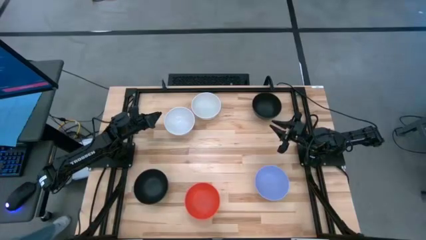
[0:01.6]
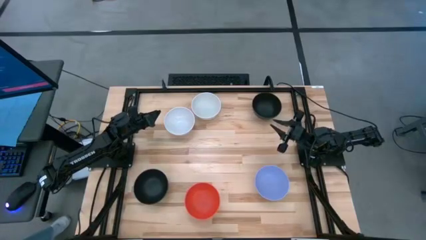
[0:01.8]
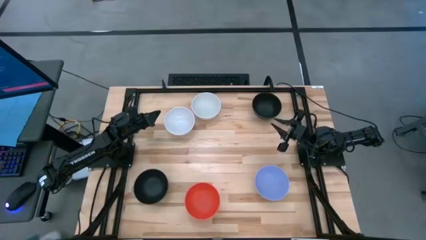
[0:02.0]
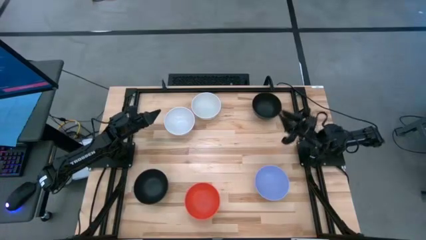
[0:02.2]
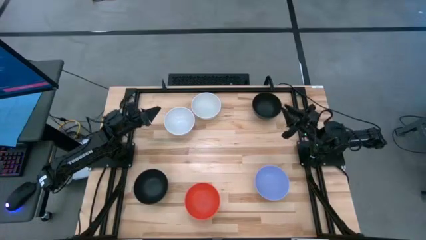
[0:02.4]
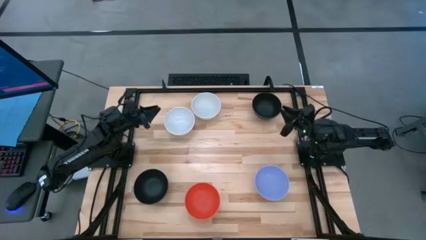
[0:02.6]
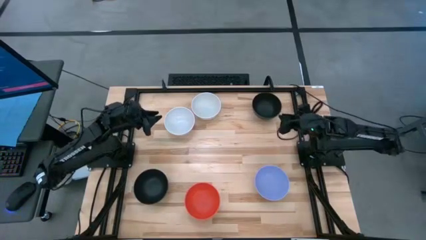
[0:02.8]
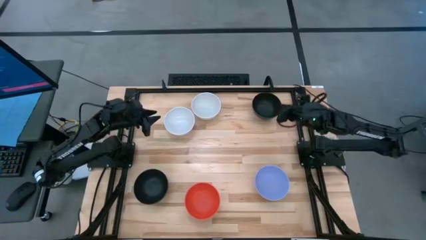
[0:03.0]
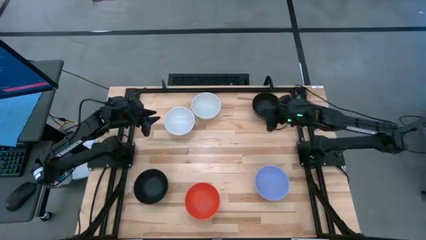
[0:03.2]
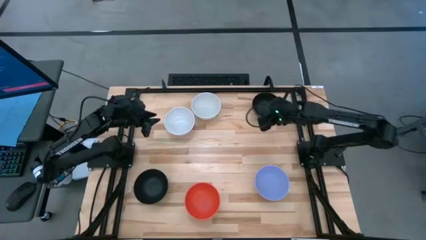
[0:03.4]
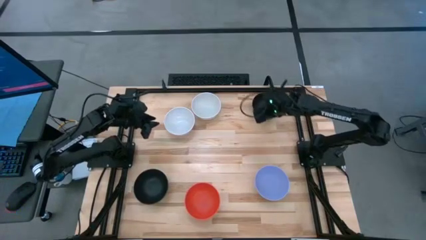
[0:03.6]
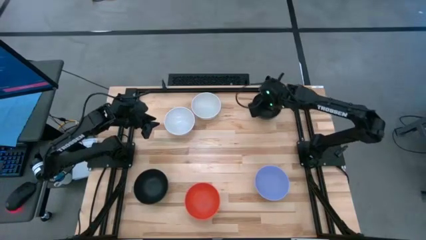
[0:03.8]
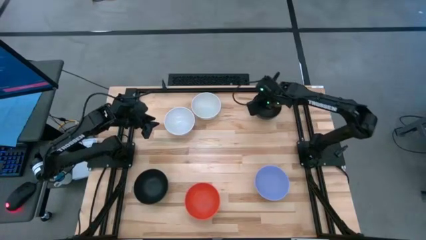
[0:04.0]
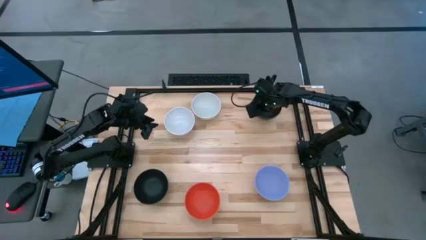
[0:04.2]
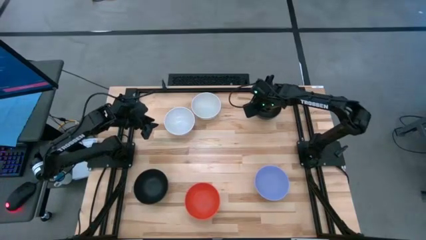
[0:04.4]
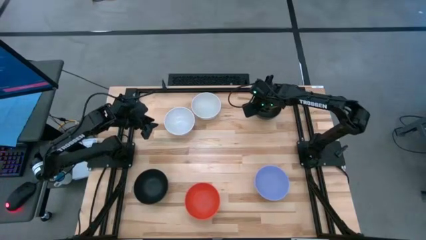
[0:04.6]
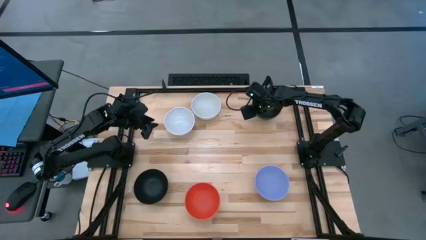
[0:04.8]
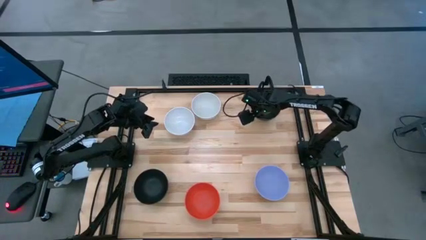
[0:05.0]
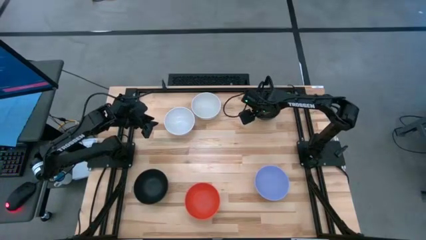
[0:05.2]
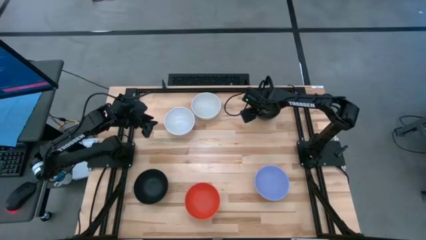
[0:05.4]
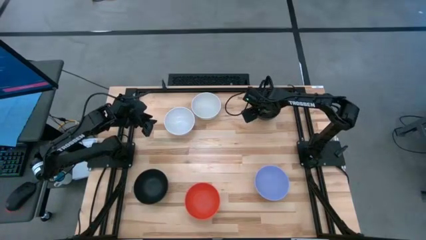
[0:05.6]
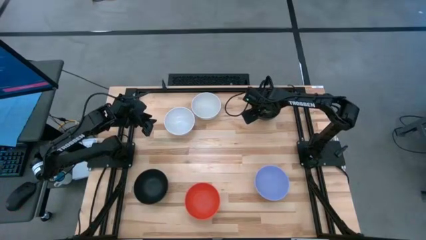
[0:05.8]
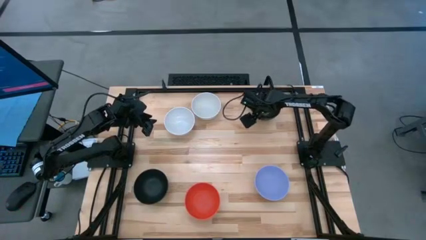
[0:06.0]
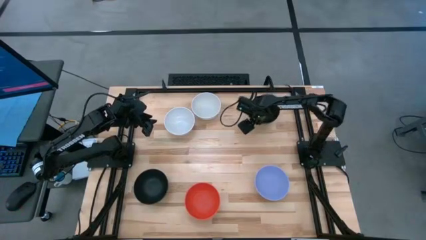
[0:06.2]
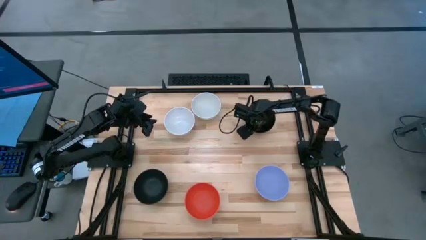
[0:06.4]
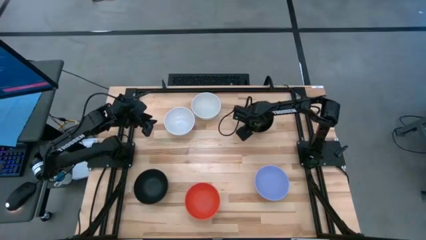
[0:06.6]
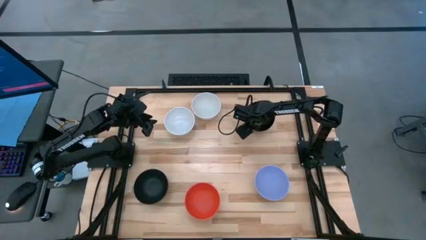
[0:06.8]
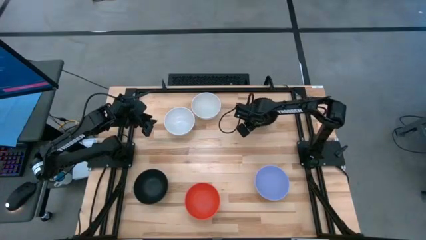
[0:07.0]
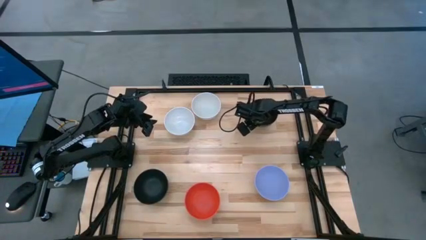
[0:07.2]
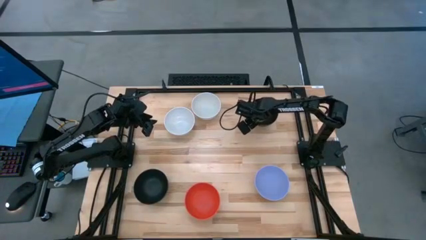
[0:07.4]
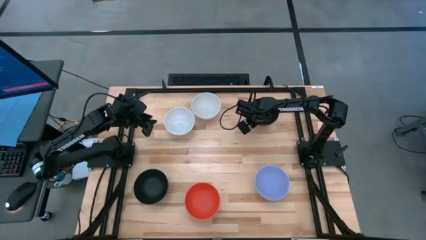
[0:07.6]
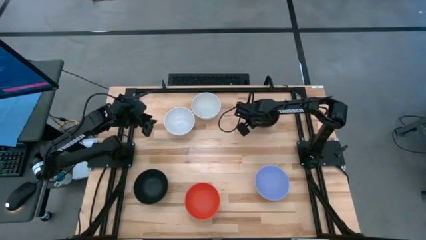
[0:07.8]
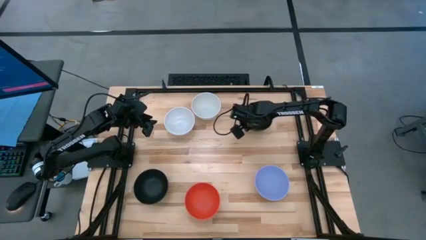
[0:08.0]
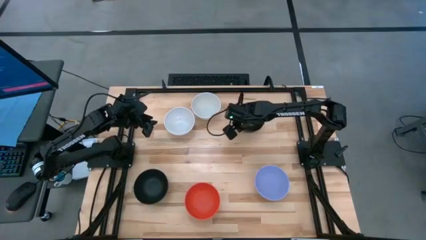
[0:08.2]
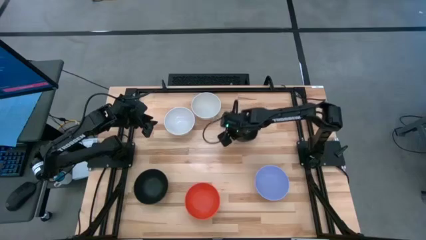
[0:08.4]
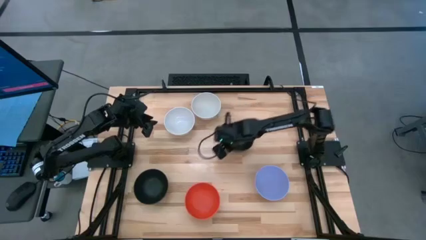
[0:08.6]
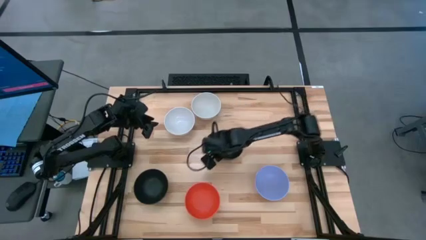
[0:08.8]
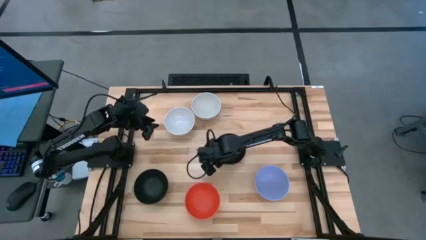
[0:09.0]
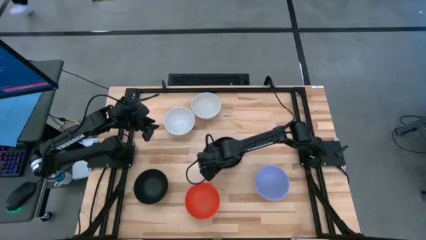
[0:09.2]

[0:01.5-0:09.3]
Task: Nest bowls inside each other
Move the right black bowl to the center of the table

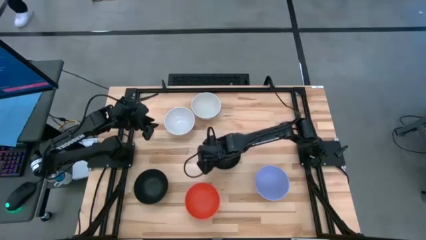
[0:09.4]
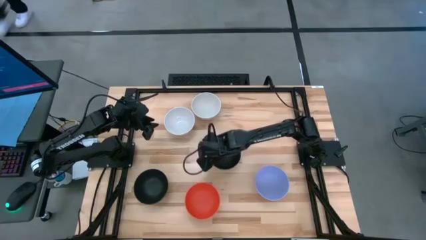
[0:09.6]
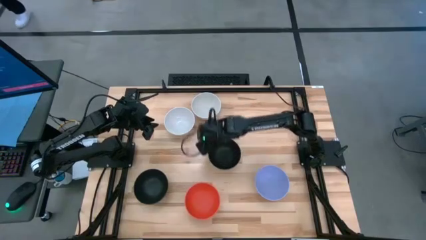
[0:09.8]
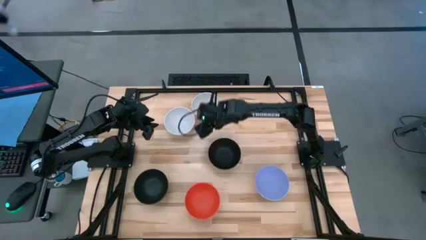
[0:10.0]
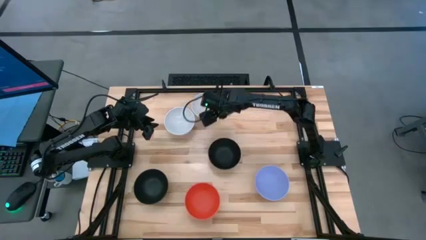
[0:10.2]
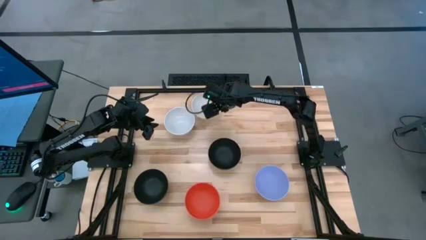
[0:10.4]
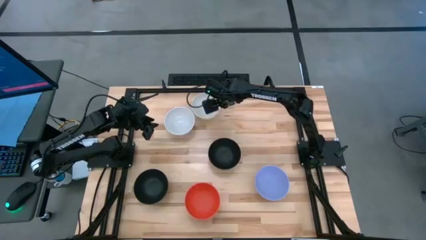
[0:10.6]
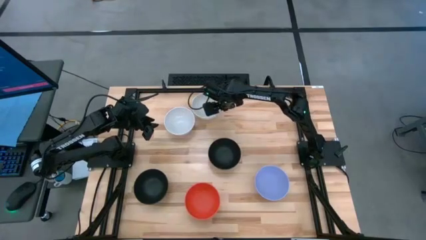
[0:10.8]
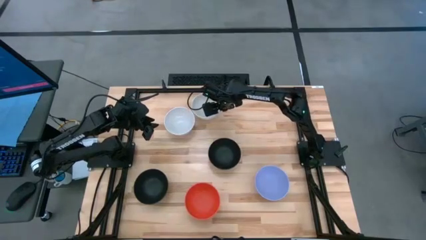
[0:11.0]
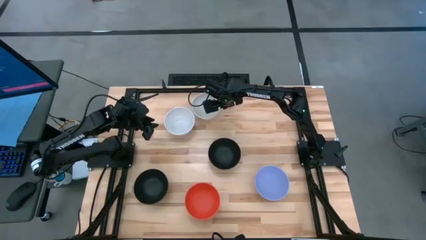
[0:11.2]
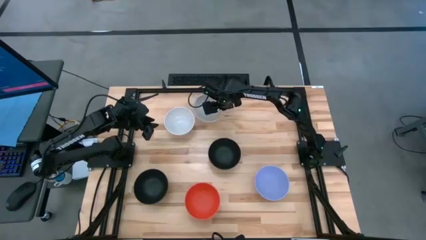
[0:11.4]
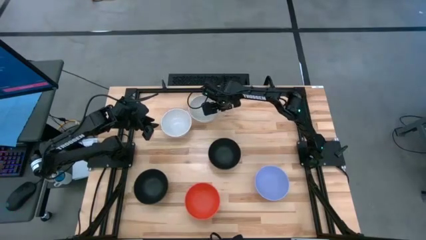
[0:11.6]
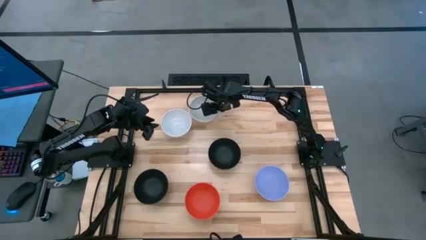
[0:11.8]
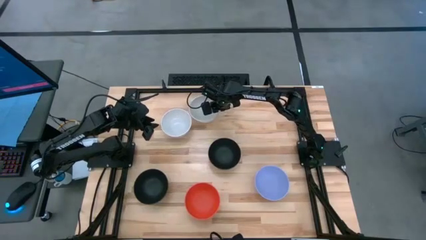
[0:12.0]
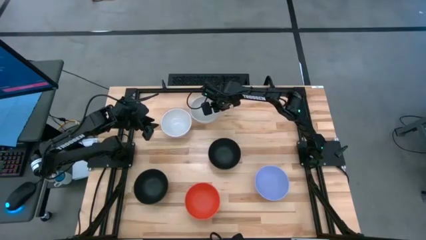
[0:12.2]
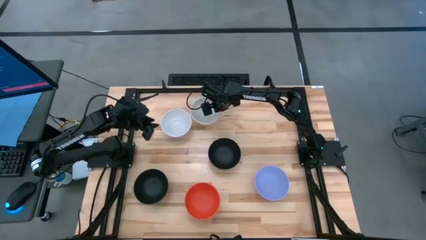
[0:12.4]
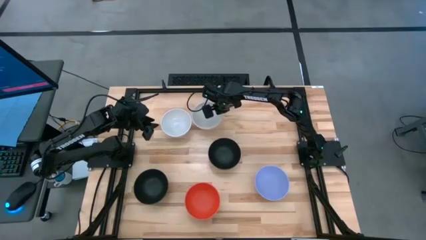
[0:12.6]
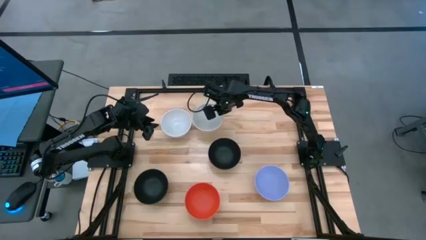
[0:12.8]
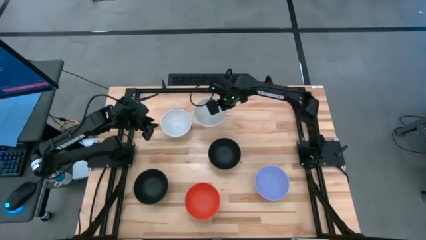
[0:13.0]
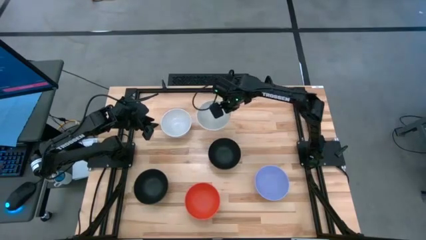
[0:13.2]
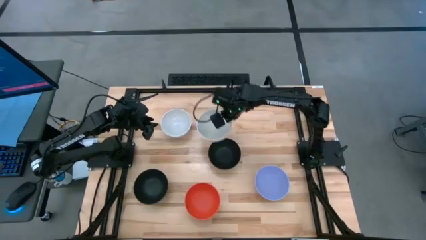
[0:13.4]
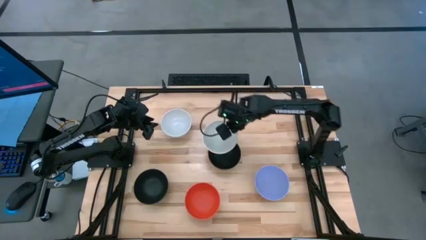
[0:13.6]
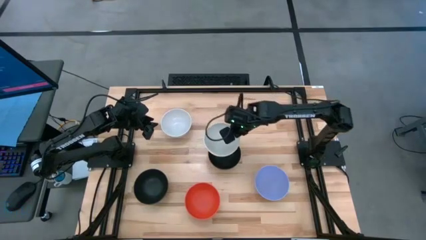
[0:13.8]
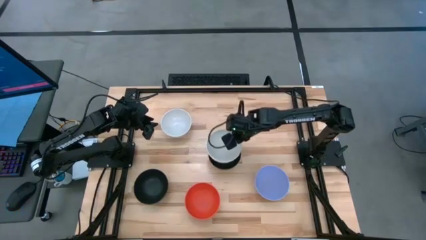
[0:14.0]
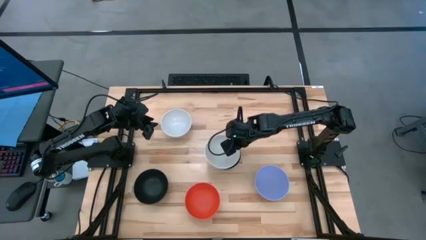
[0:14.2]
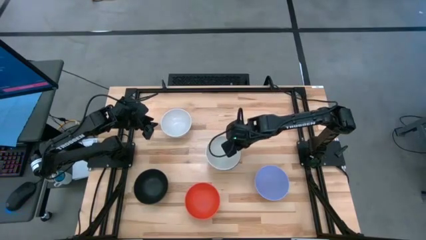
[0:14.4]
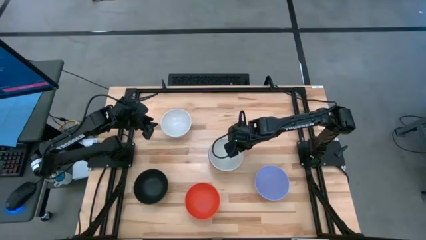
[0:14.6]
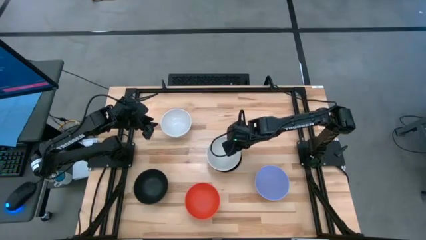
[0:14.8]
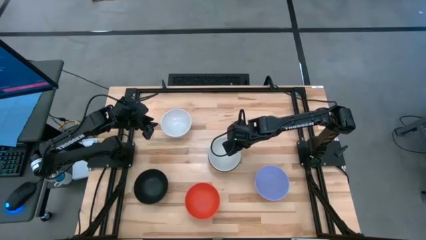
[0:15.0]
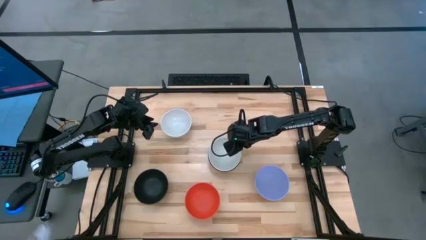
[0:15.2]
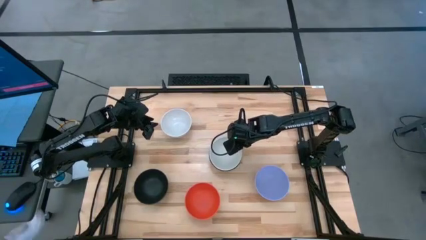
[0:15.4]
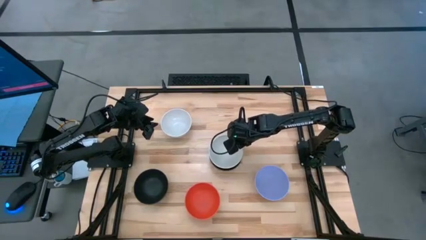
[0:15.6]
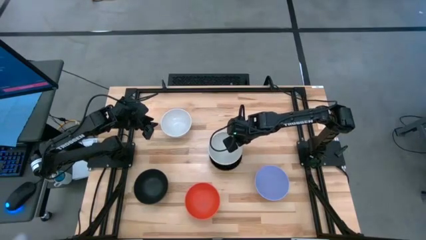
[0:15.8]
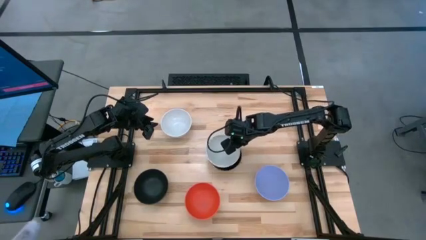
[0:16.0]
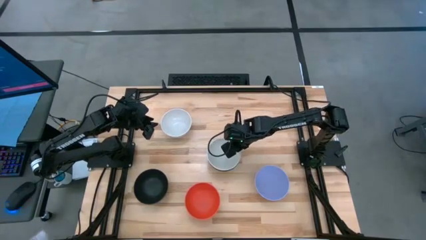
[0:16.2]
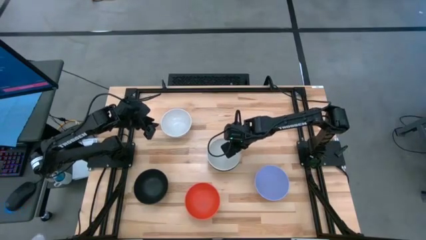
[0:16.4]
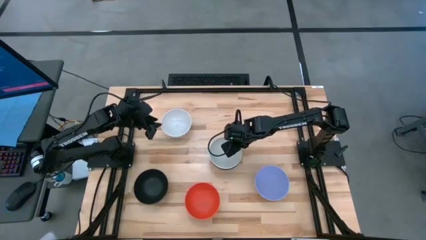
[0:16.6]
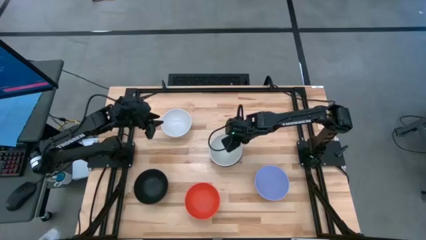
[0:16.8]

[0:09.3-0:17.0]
Stack the right white bowl on top of the right black bowl
